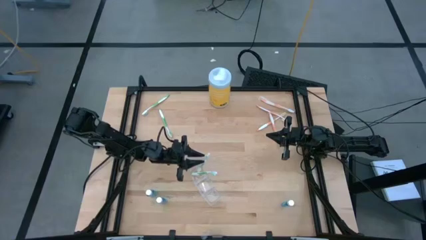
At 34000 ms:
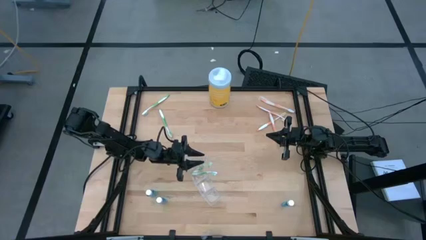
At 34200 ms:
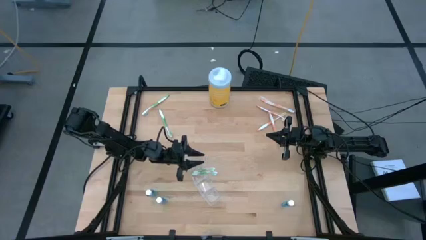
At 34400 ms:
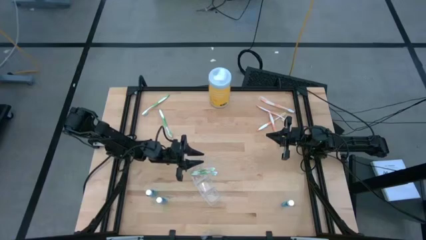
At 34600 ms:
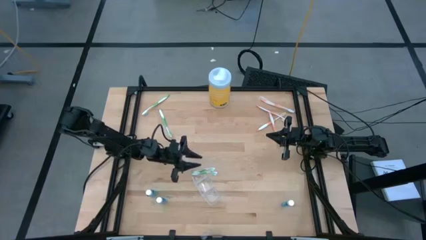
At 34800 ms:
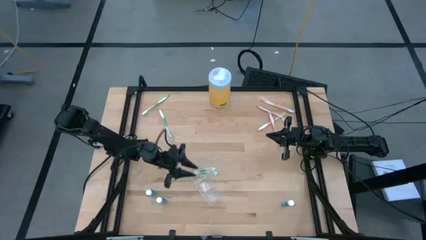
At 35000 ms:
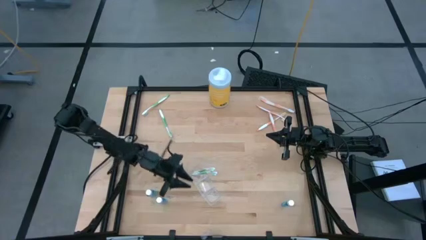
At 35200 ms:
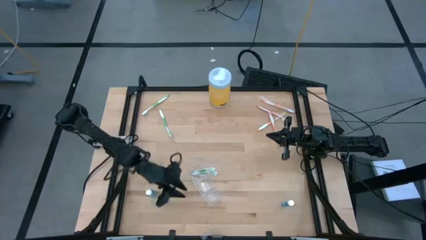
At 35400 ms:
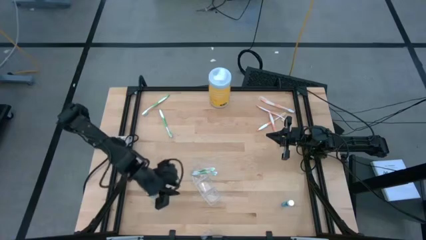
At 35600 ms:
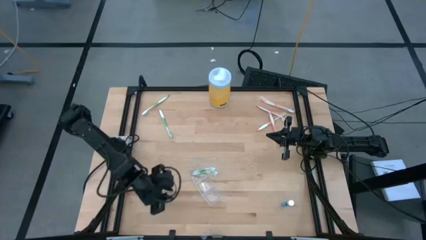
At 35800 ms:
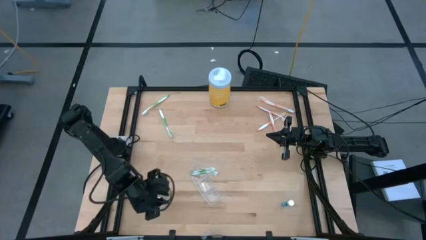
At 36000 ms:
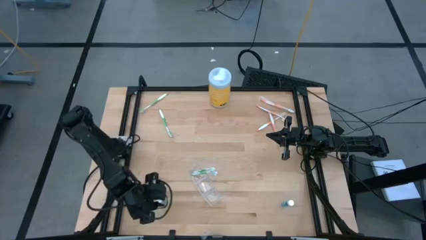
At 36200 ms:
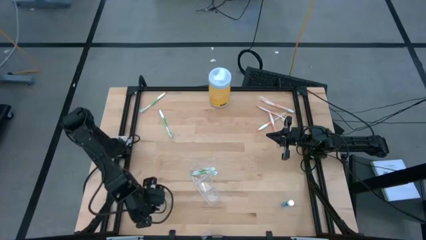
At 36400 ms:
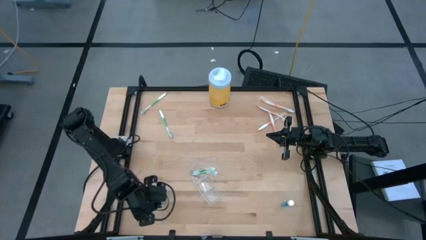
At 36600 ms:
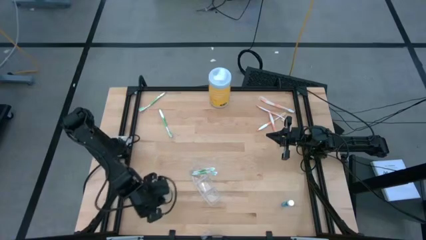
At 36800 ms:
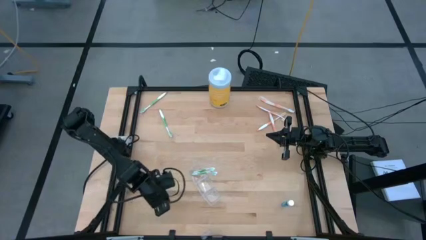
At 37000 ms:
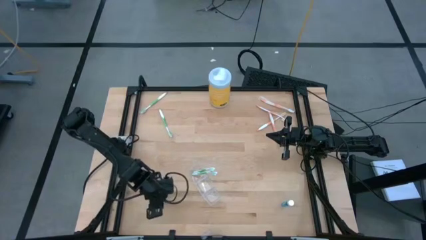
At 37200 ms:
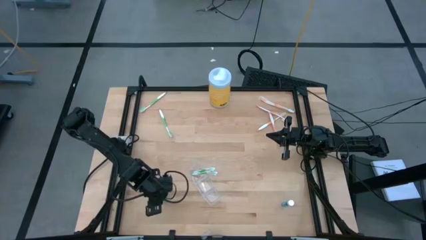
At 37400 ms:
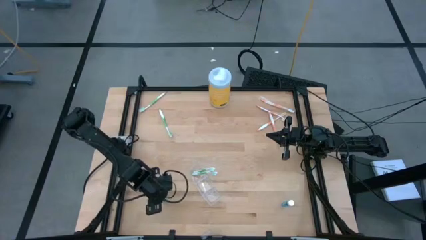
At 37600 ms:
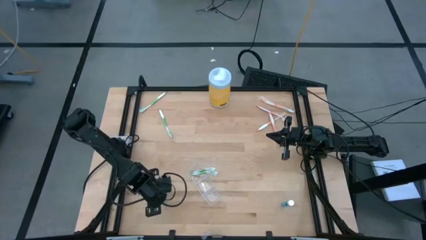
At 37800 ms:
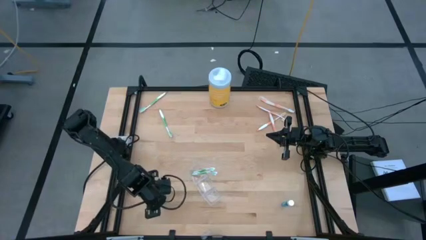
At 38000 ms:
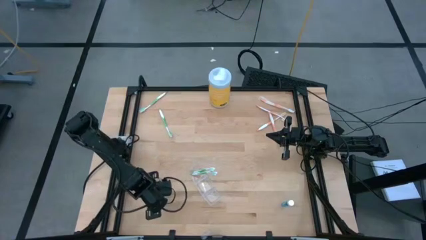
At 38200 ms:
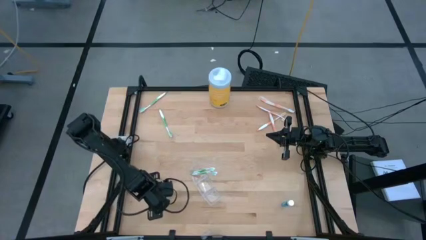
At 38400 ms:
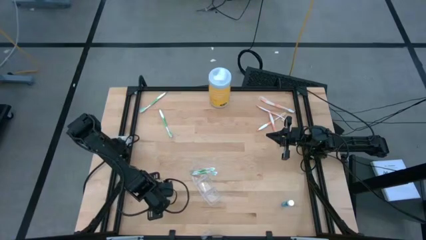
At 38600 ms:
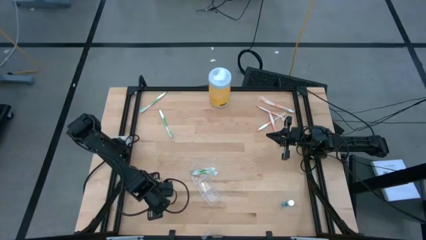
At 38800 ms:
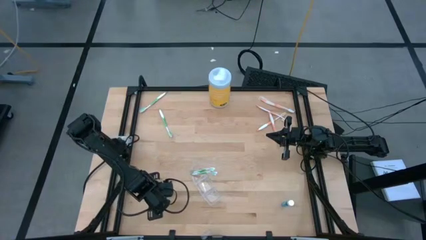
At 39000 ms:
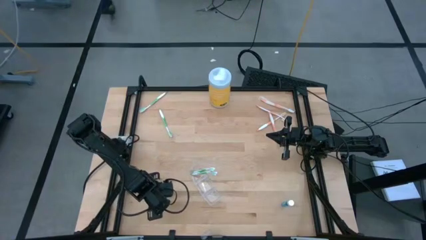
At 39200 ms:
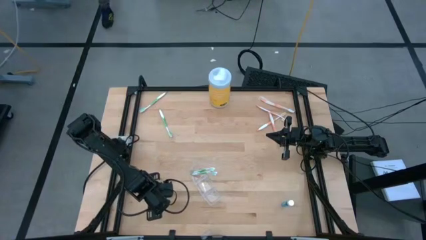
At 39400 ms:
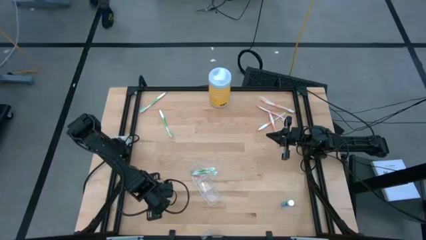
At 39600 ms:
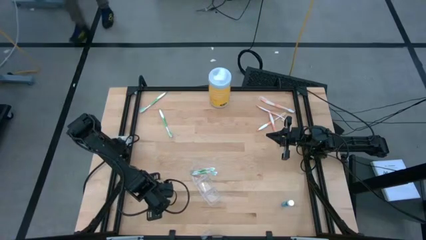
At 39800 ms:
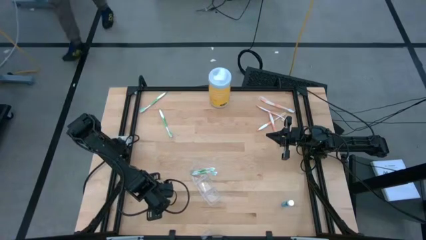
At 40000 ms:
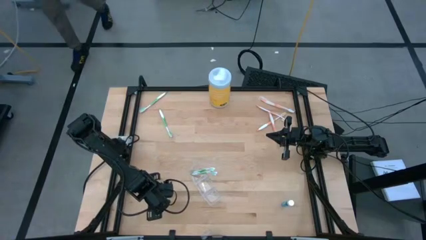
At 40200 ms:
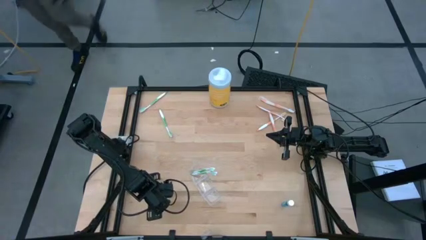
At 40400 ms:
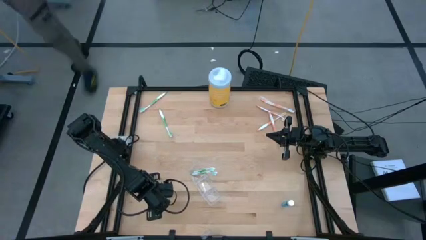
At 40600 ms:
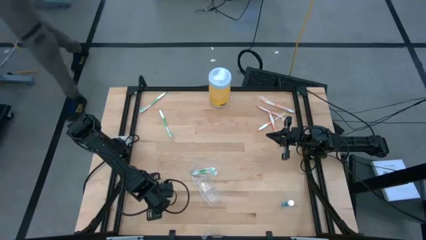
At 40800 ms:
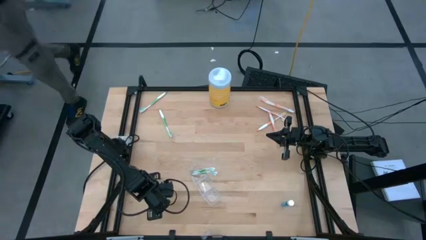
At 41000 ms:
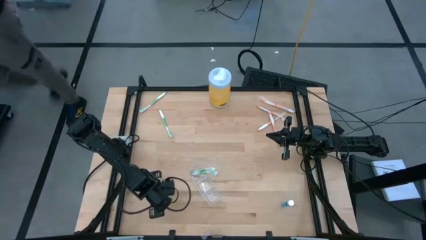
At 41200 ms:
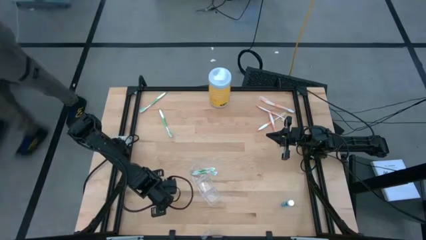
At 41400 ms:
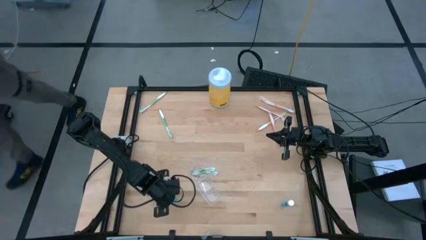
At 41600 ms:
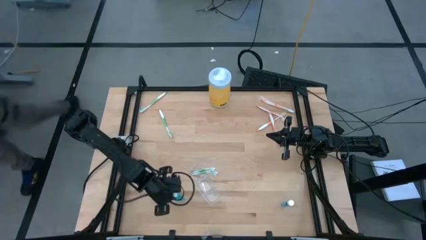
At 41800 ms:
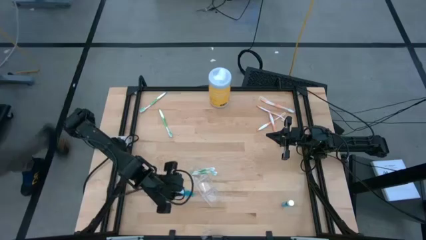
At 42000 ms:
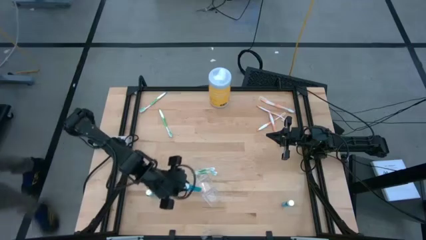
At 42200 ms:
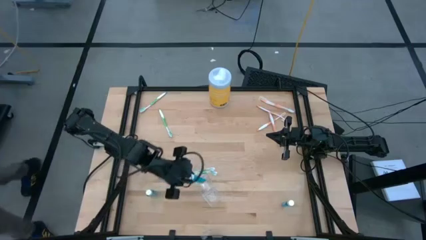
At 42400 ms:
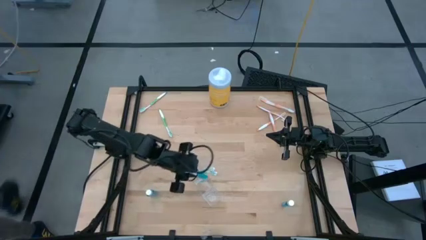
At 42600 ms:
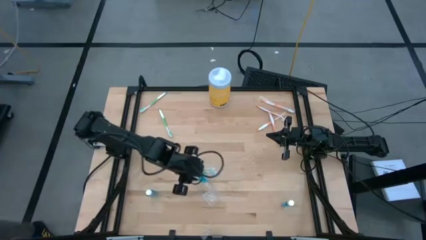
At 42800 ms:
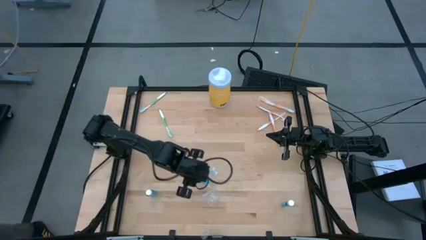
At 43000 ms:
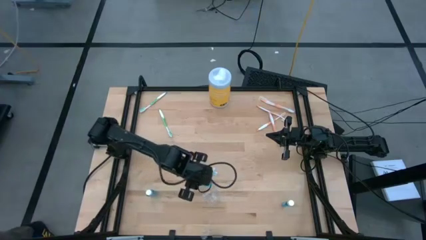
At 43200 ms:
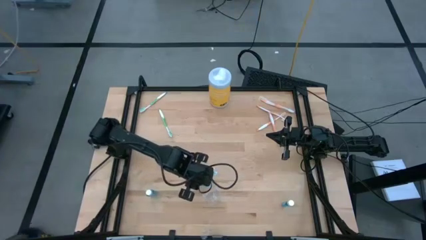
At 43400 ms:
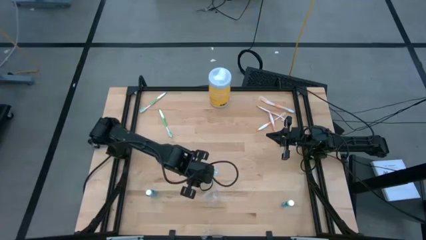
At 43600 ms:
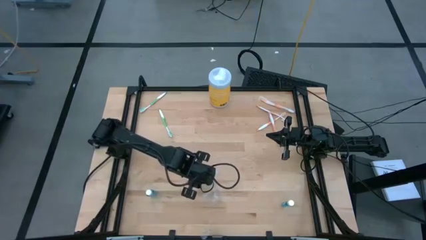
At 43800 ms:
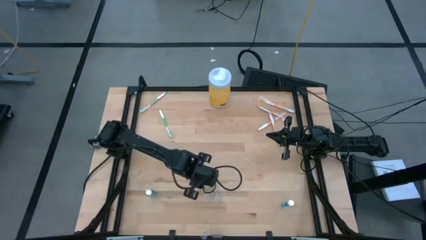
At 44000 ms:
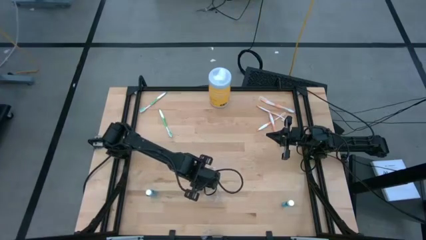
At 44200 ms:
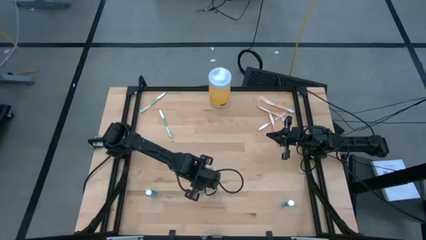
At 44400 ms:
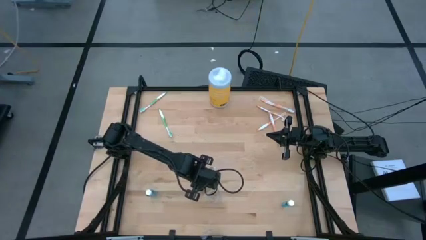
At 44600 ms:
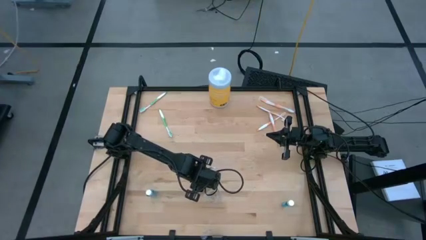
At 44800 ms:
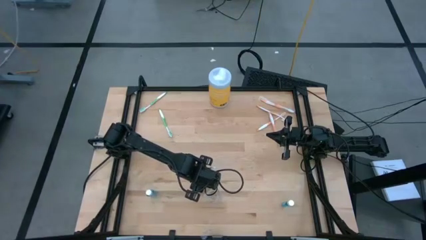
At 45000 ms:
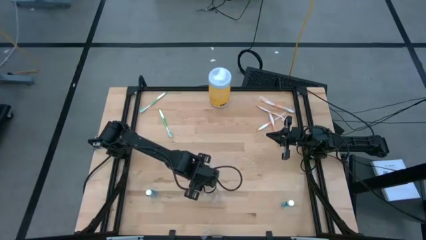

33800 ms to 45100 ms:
Task: Pick & Place toothbrushing station
Put the blue mouthwash into the transparent organizer
